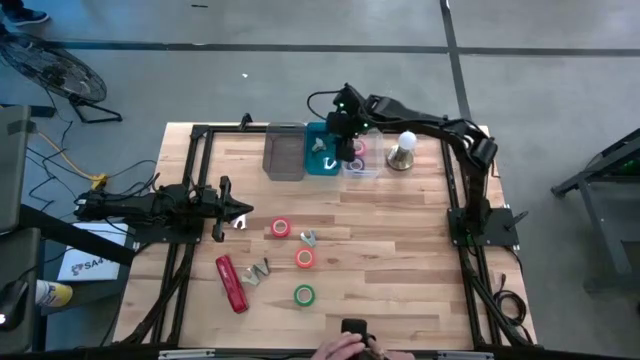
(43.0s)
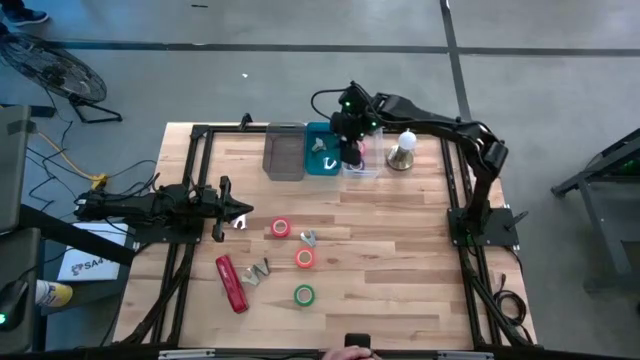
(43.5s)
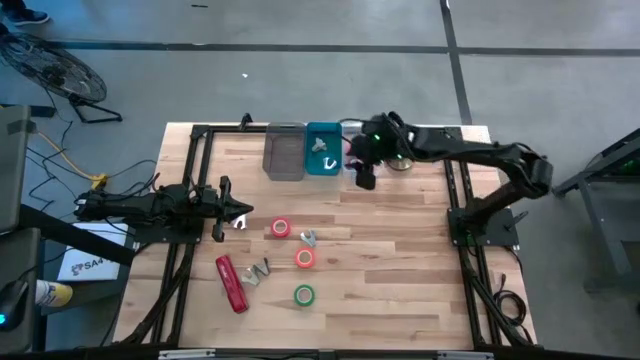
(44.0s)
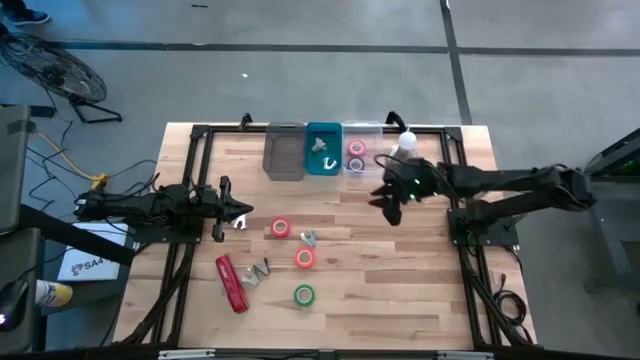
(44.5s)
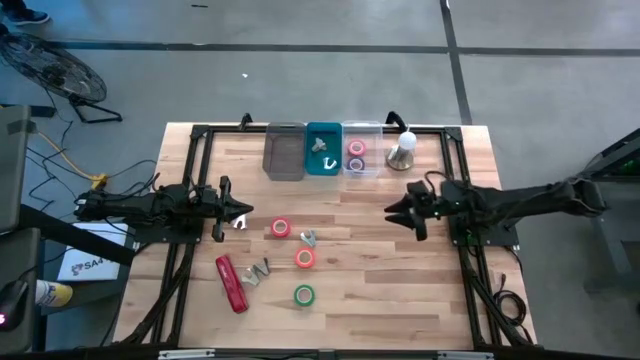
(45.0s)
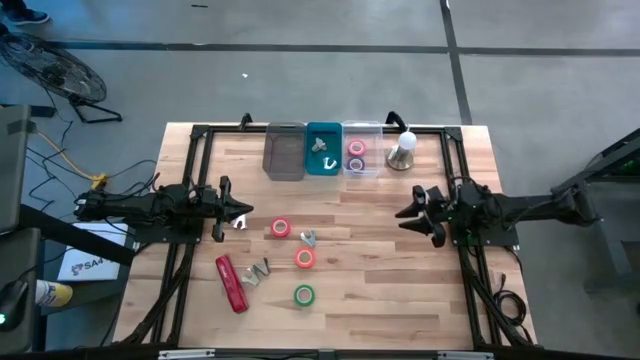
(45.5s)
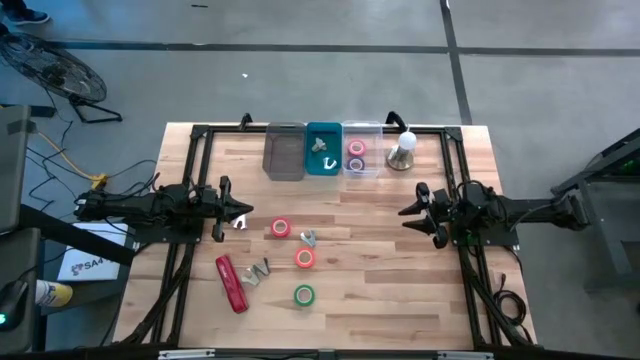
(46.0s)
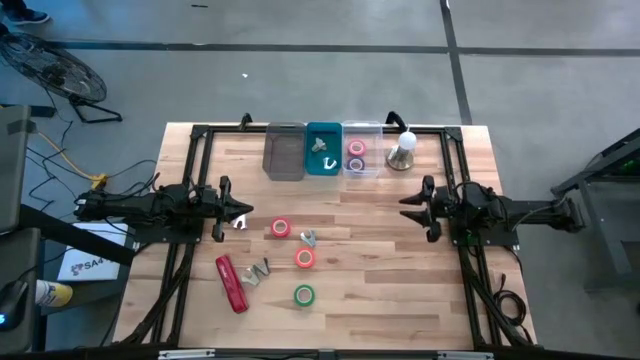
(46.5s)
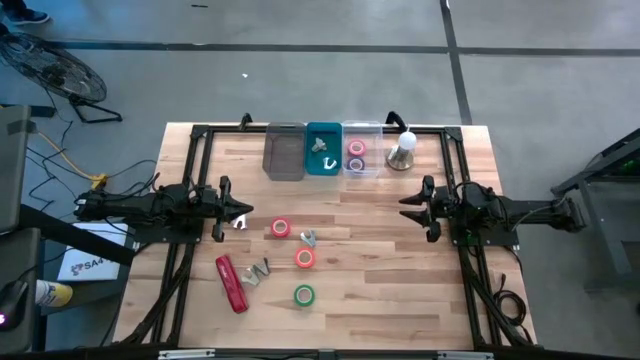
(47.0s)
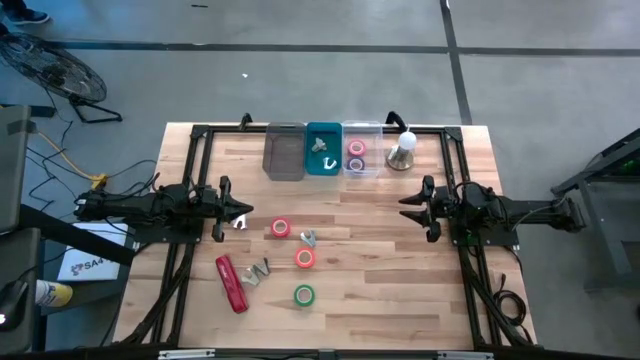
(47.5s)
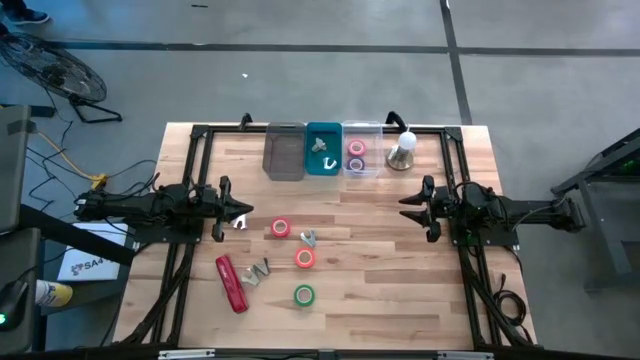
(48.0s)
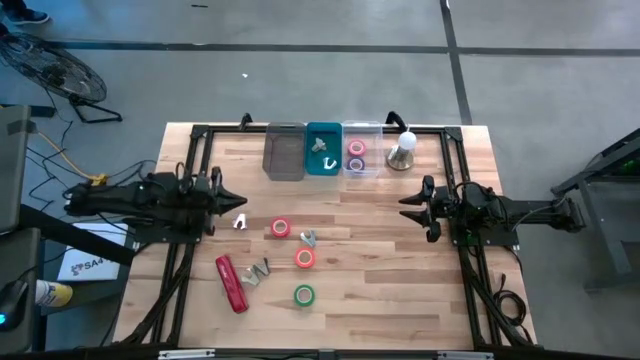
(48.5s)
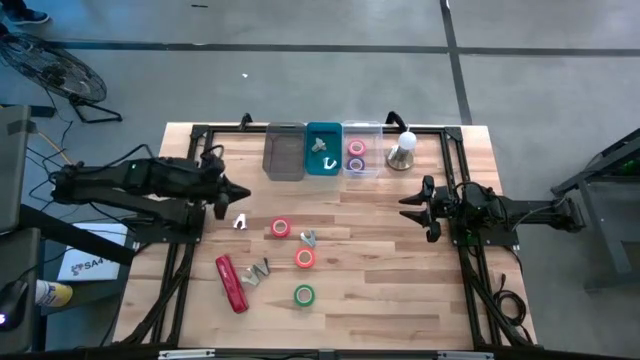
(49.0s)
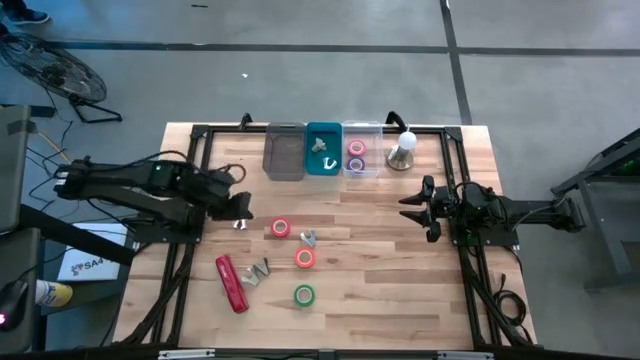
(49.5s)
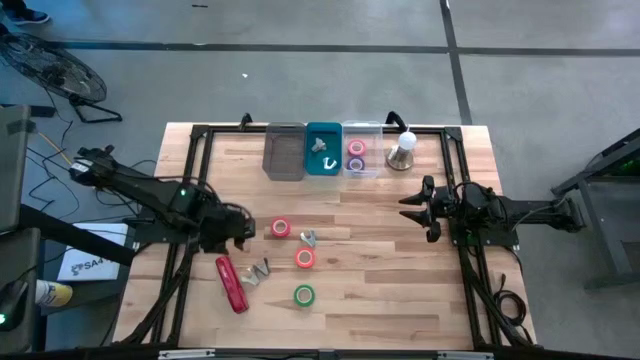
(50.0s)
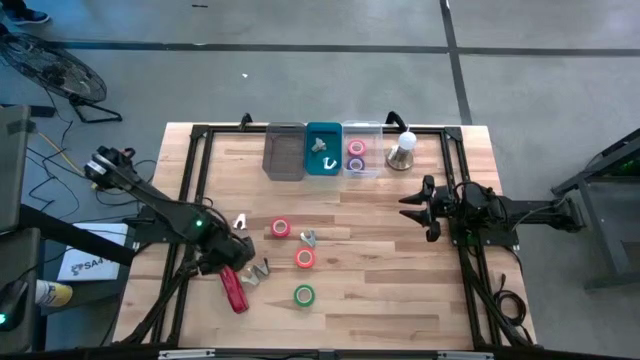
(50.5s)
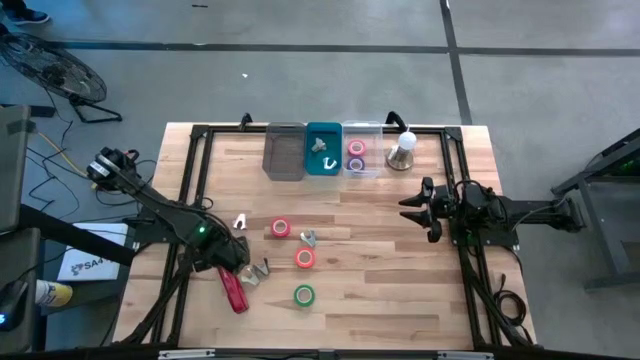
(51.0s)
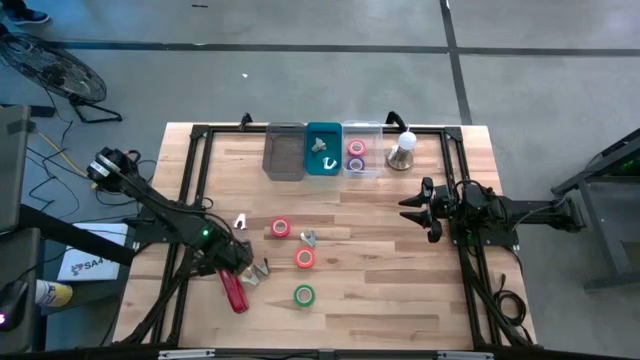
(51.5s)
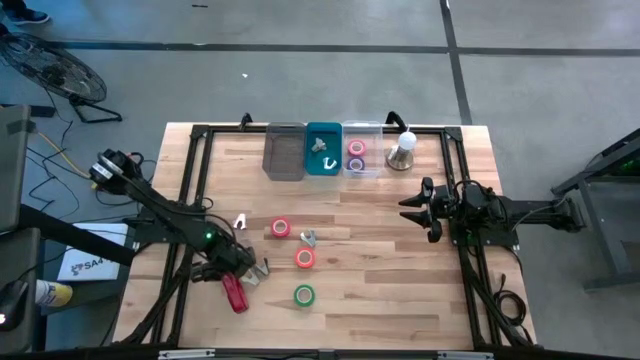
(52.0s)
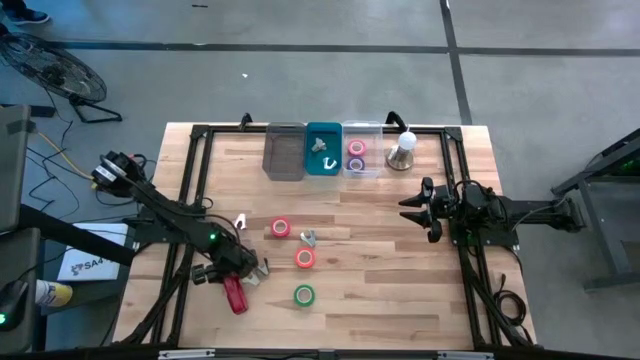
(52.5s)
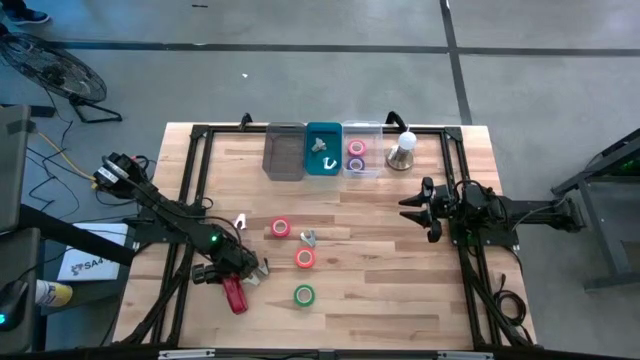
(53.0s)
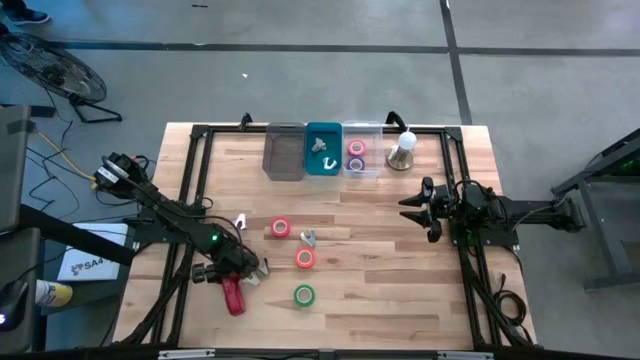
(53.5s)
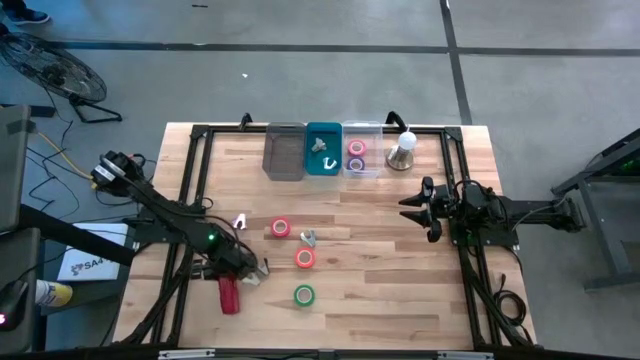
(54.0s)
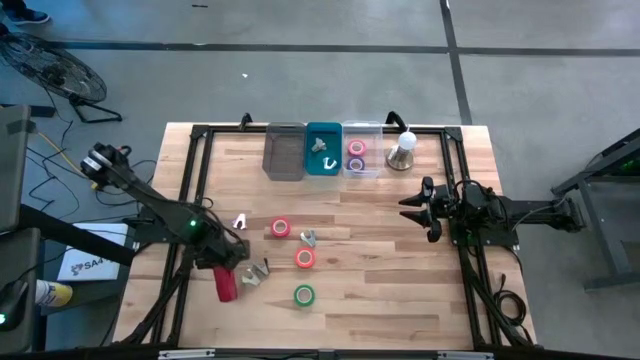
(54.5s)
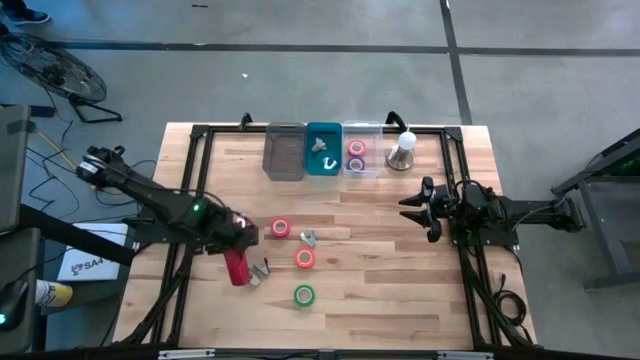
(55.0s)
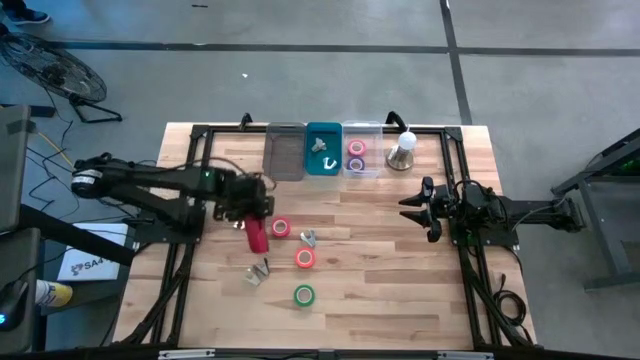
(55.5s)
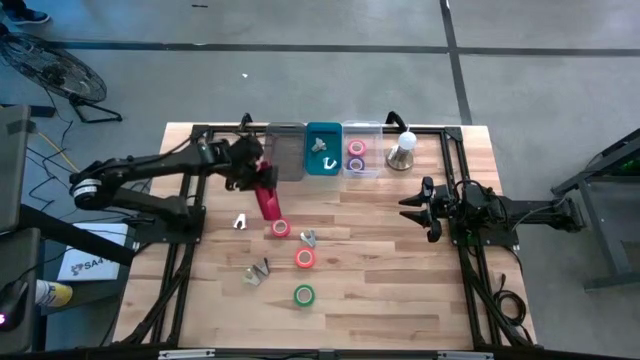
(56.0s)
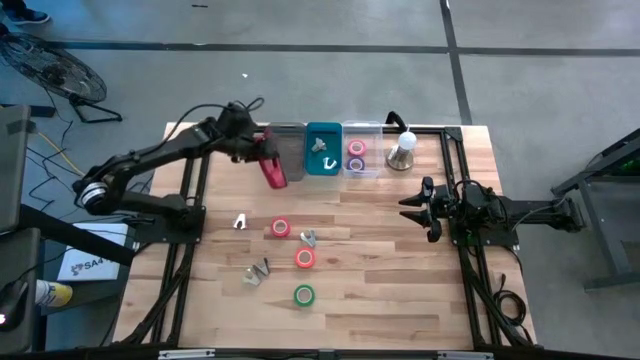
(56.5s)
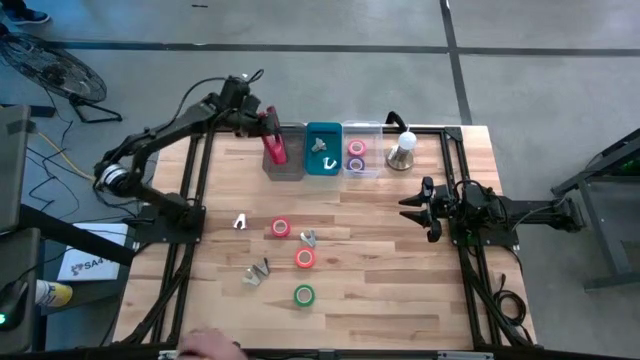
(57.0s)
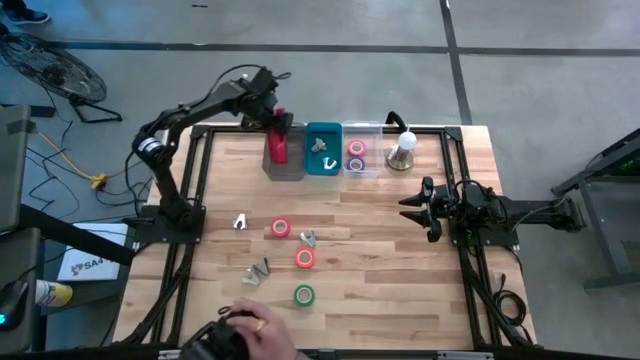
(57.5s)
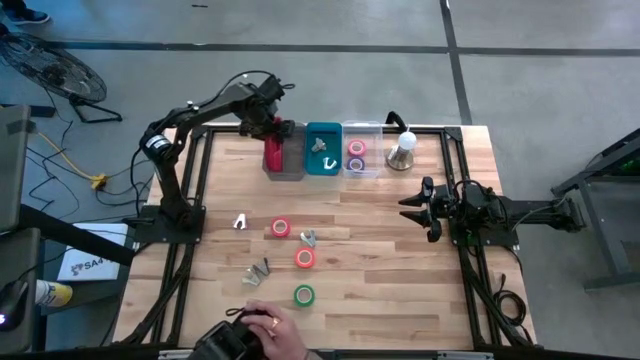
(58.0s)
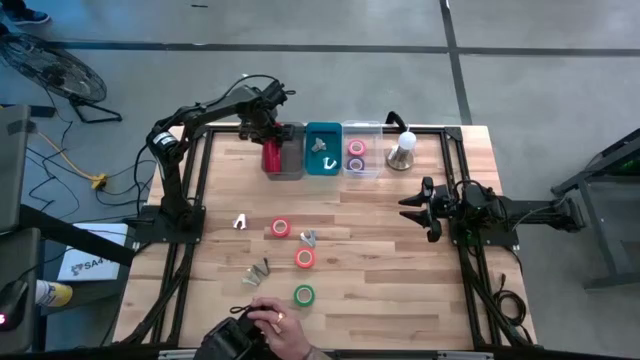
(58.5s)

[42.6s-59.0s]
Task: Pick and place Stapler, Stapler remover, tape
Put the red stapler into the black bin

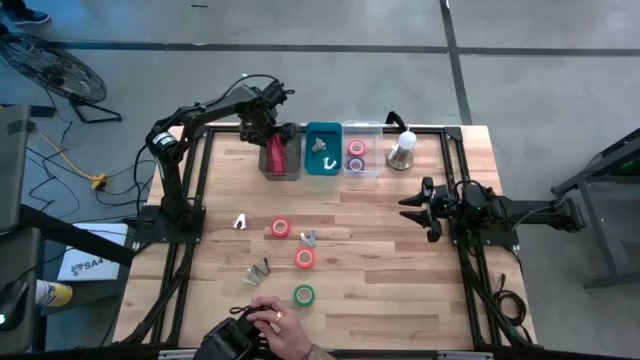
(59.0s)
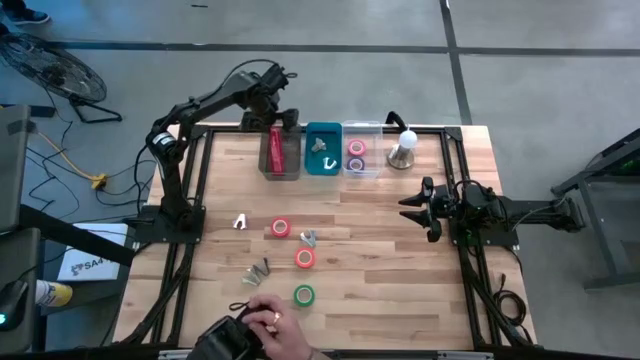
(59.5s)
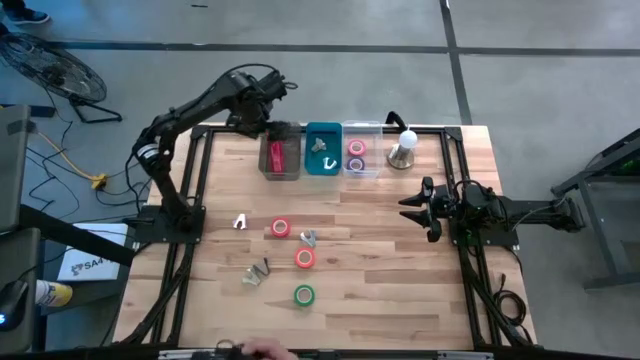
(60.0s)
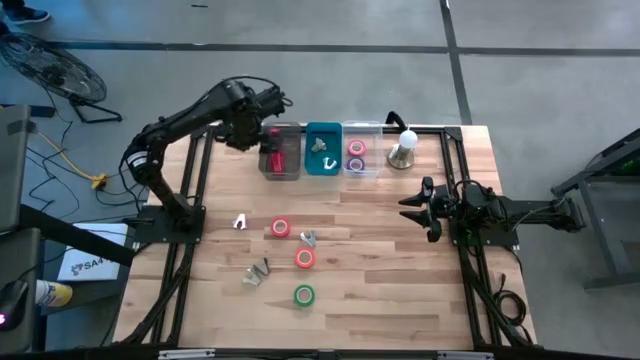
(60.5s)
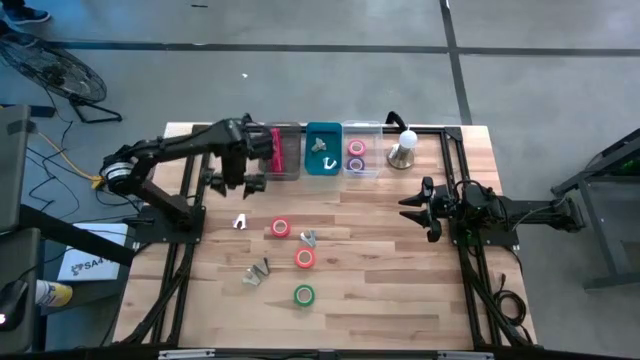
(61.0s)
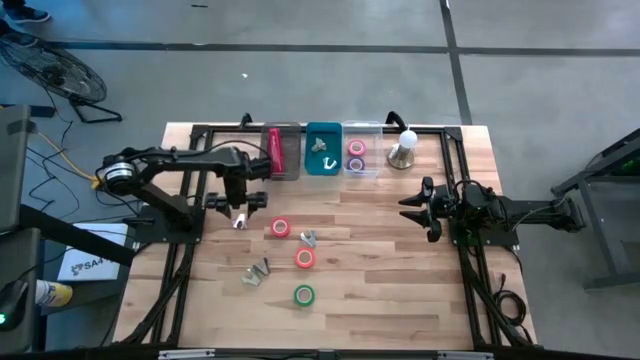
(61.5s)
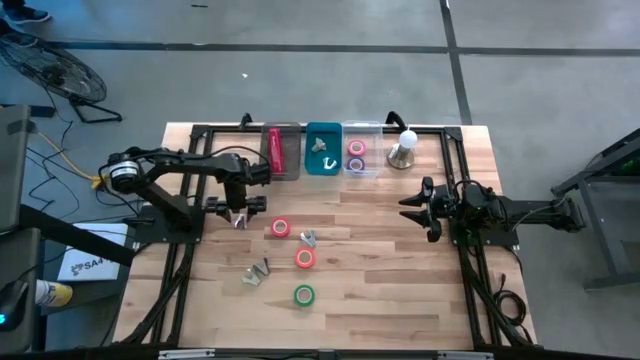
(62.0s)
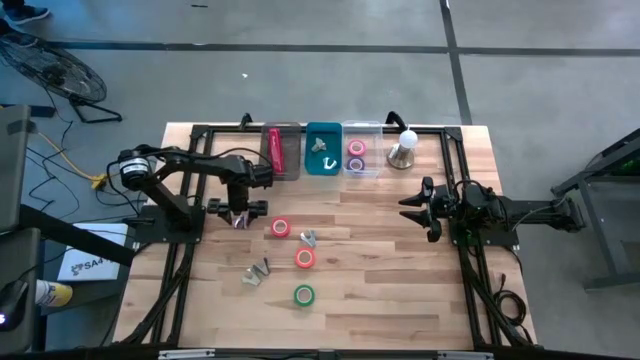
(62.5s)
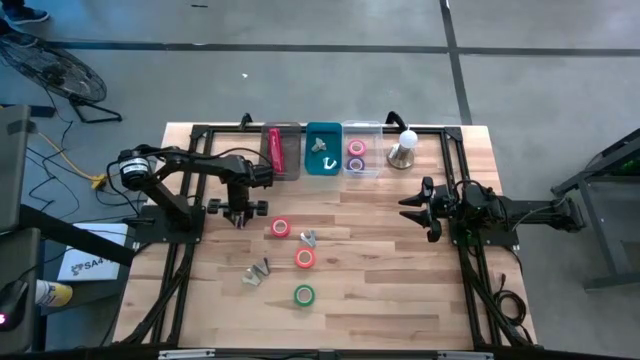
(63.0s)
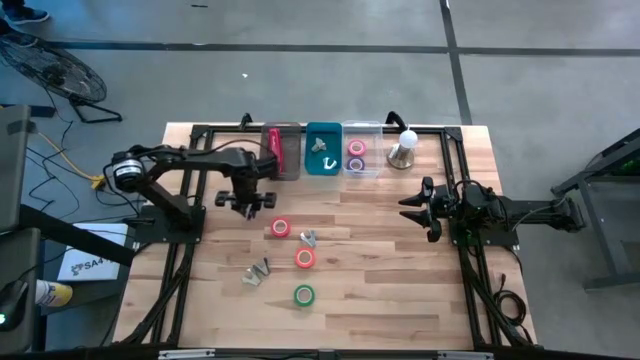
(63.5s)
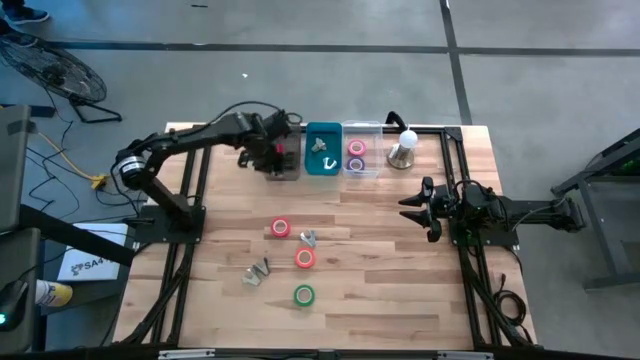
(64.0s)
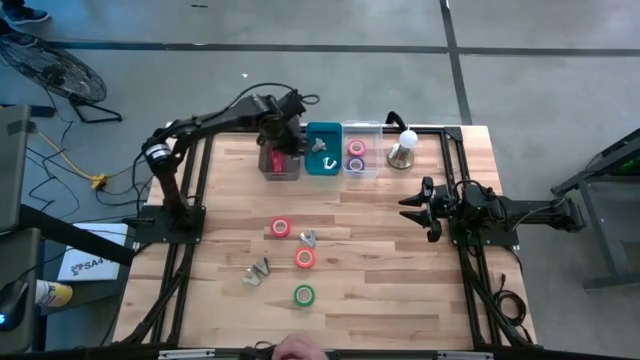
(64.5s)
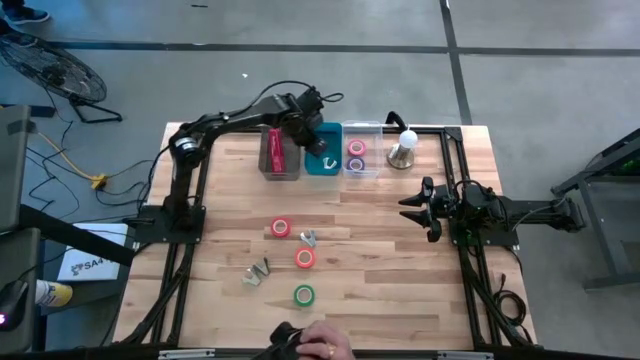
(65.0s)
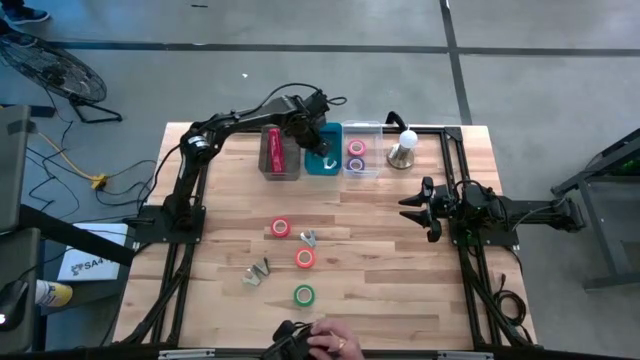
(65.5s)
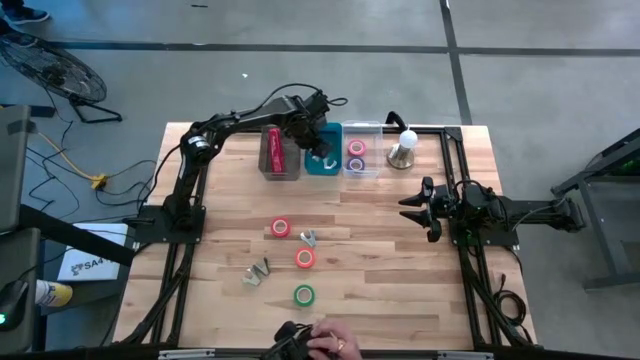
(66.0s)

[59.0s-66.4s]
Put the purple staple remover into the blue bin
